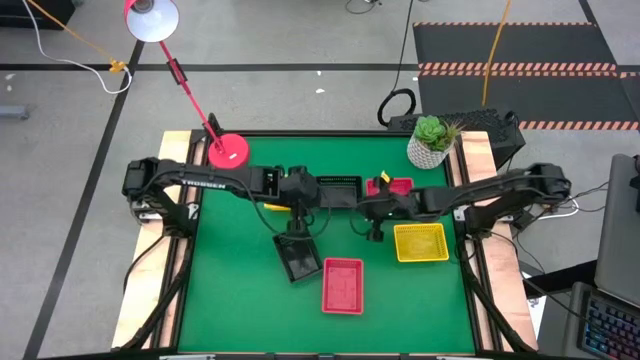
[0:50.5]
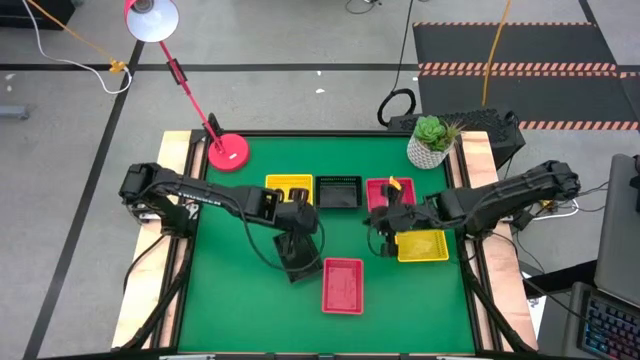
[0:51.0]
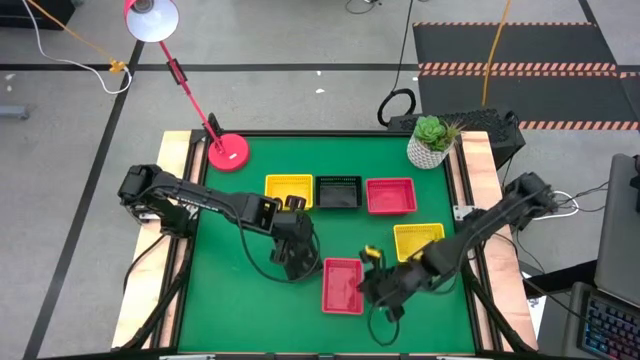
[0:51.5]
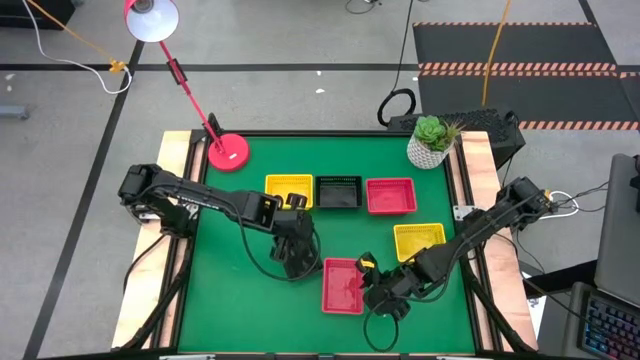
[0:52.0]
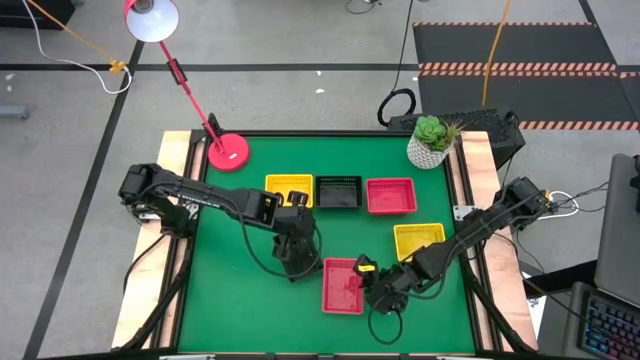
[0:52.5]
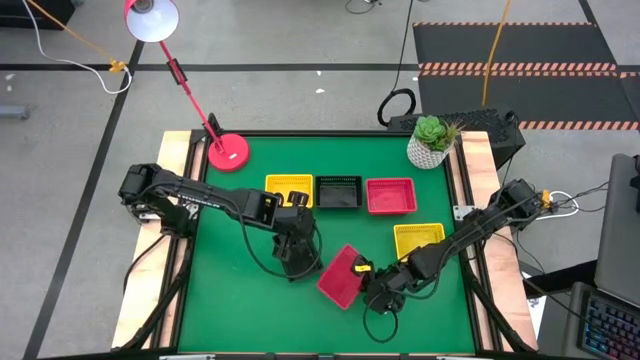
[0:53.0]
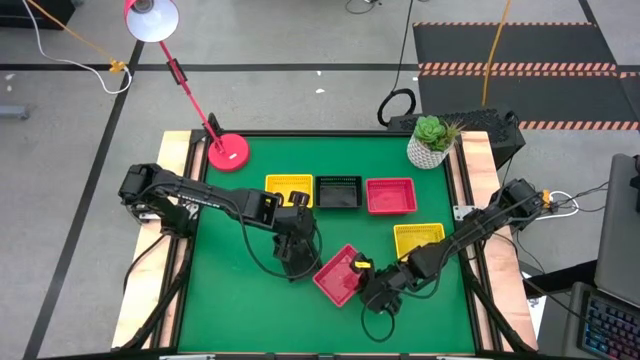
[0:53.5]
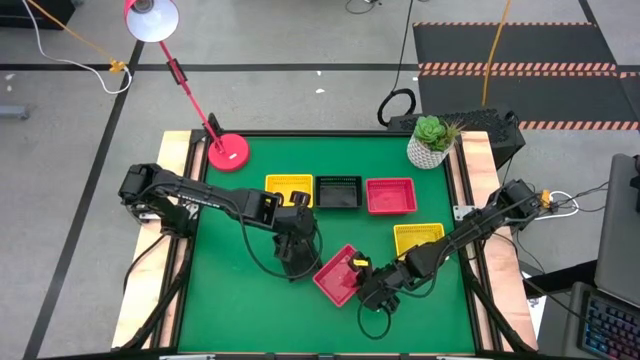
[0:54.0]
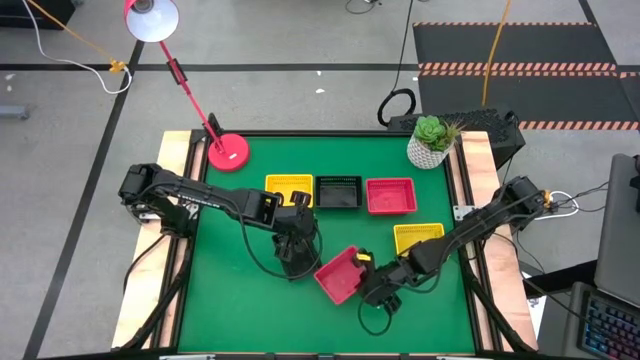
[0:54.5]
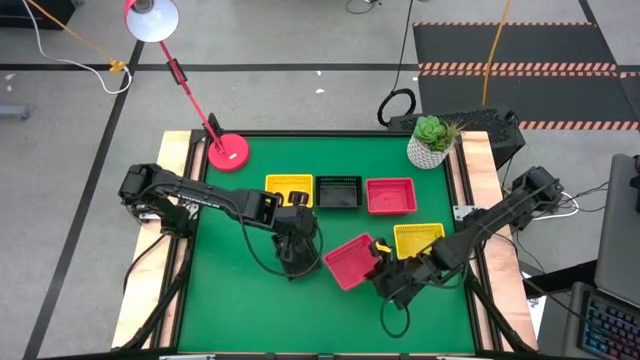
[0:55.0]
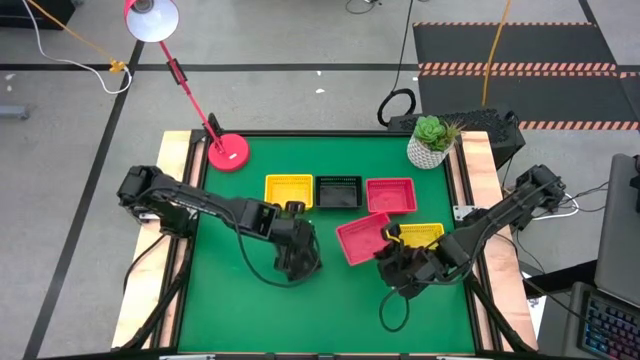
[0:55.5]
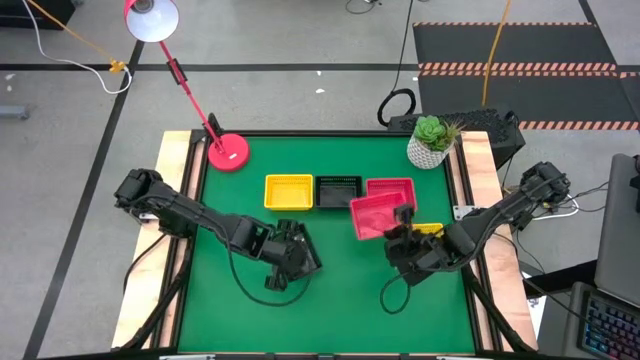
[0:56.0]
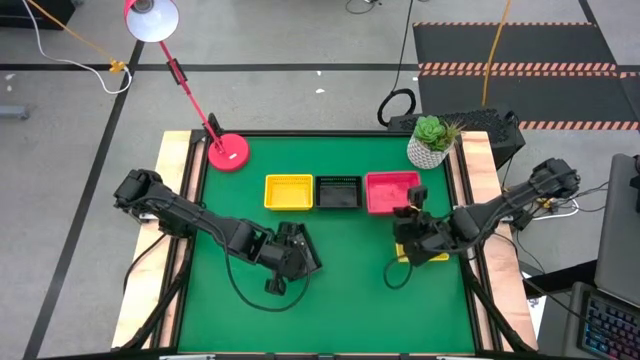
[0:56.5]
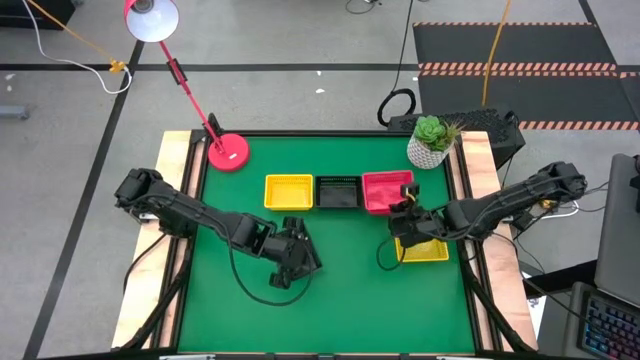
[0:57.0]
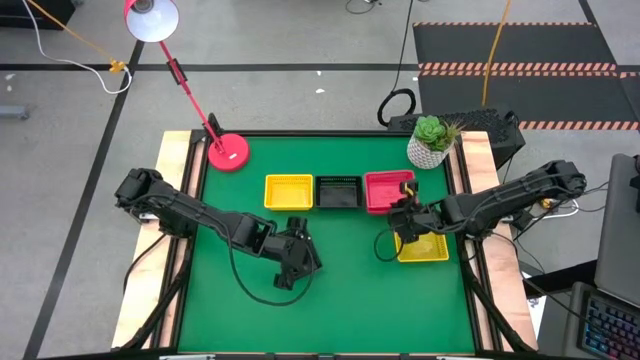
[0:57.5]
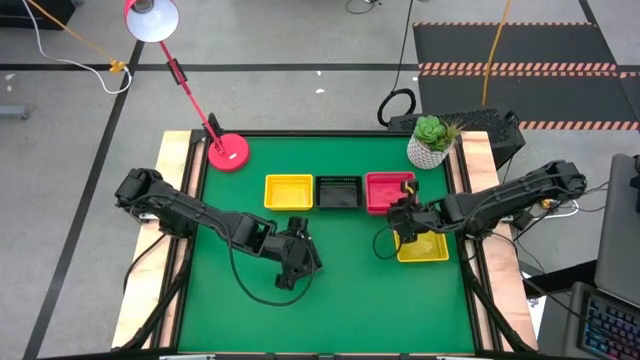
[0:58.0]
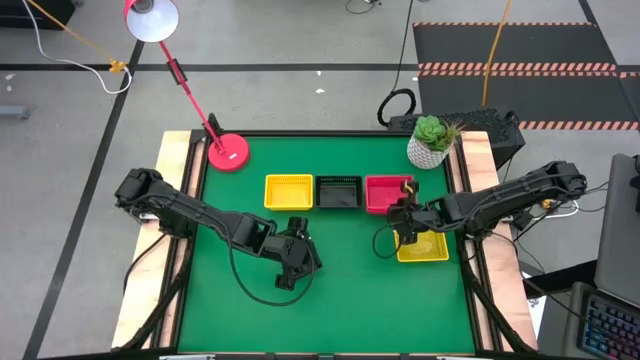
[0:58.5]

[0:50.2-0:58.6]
Stack the bottom red bin on top of the top red bin

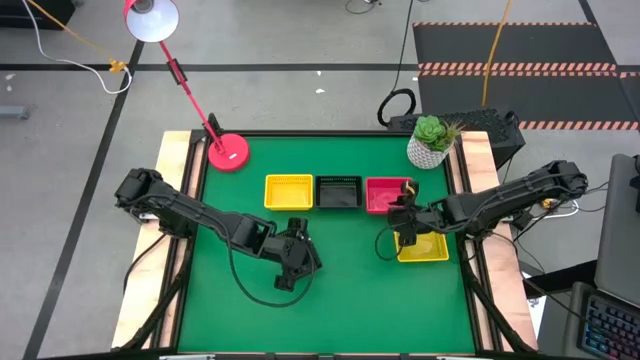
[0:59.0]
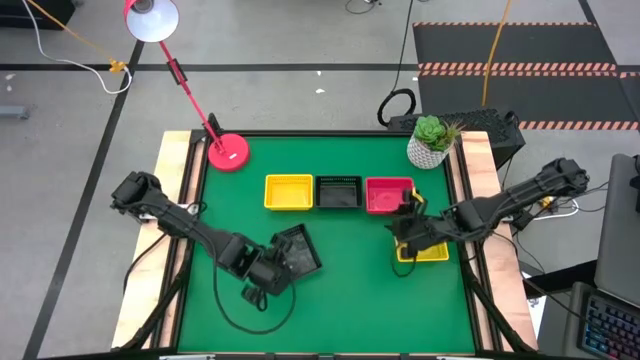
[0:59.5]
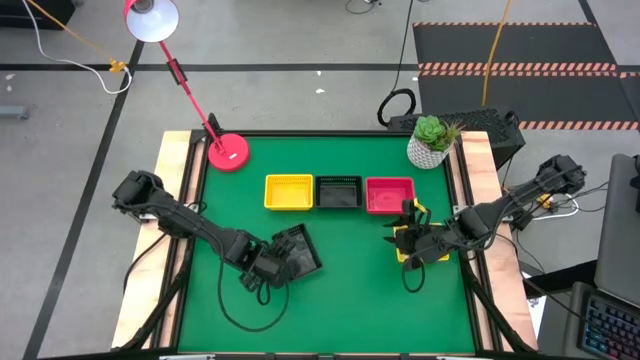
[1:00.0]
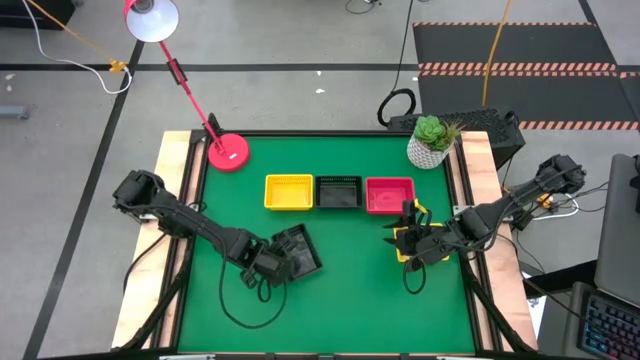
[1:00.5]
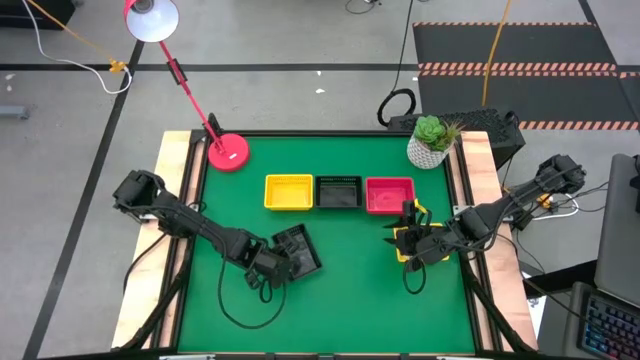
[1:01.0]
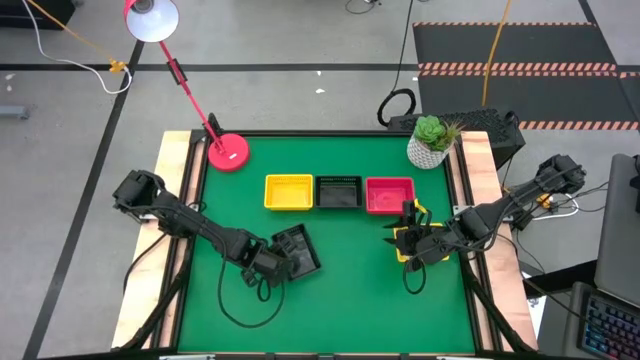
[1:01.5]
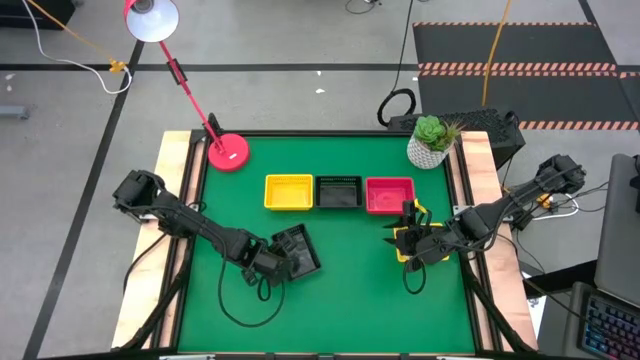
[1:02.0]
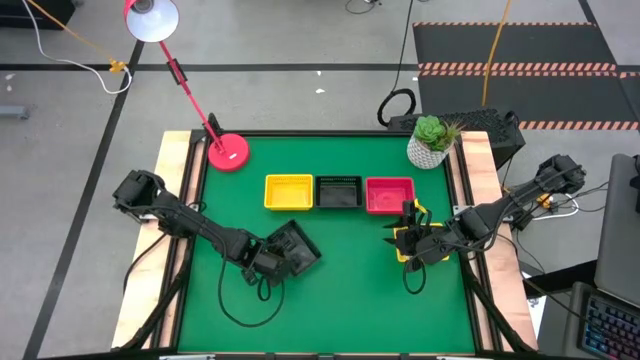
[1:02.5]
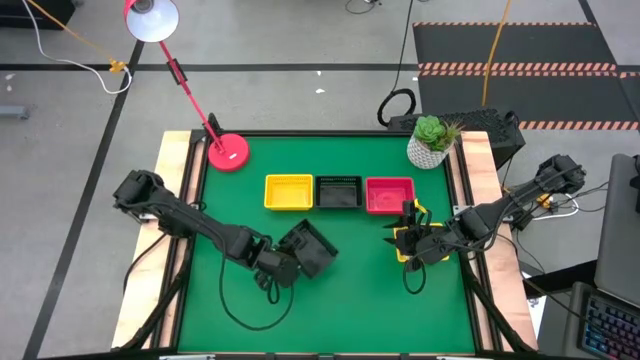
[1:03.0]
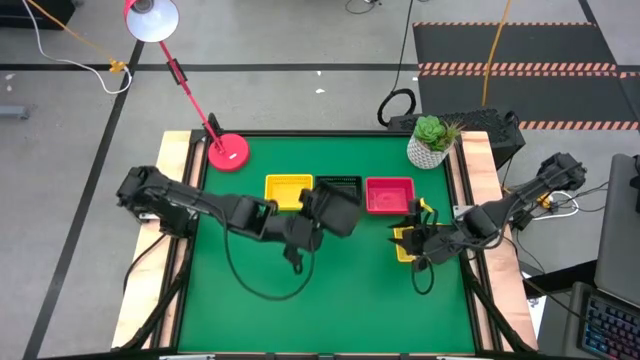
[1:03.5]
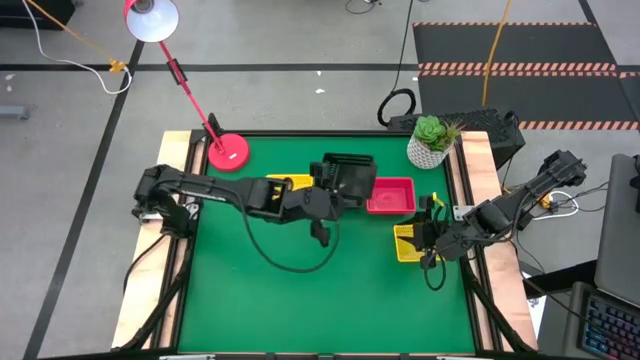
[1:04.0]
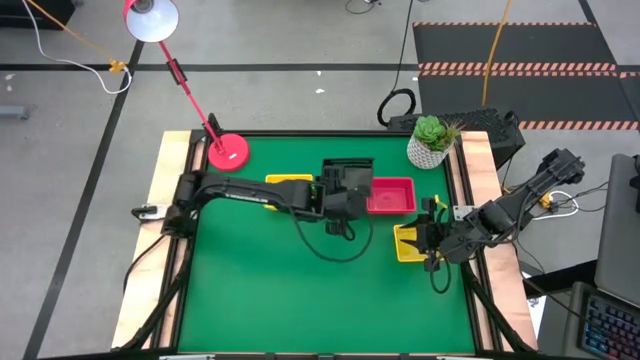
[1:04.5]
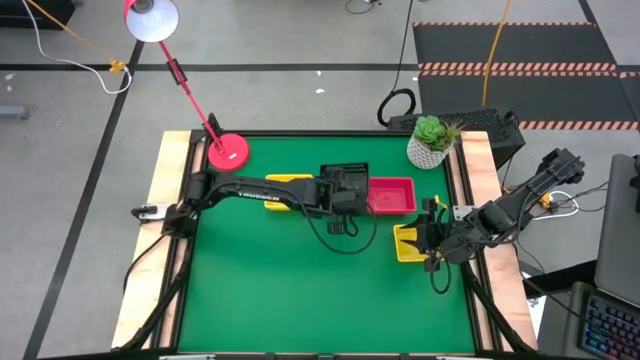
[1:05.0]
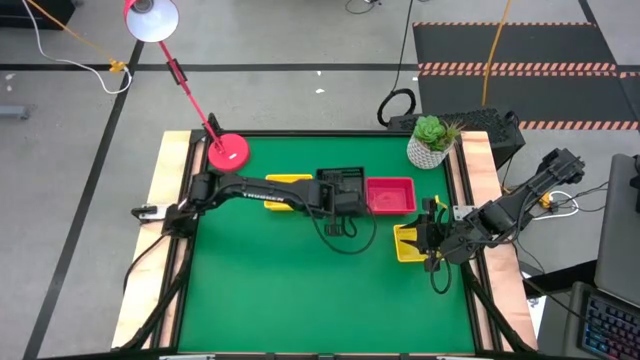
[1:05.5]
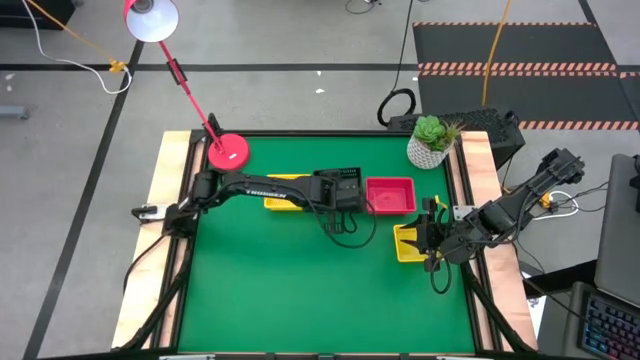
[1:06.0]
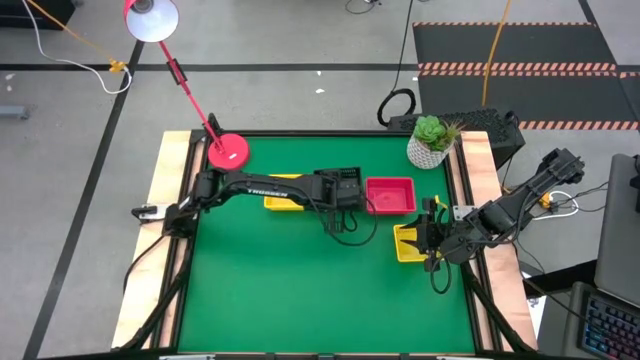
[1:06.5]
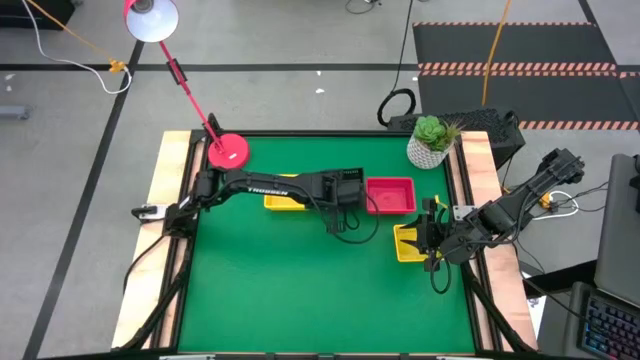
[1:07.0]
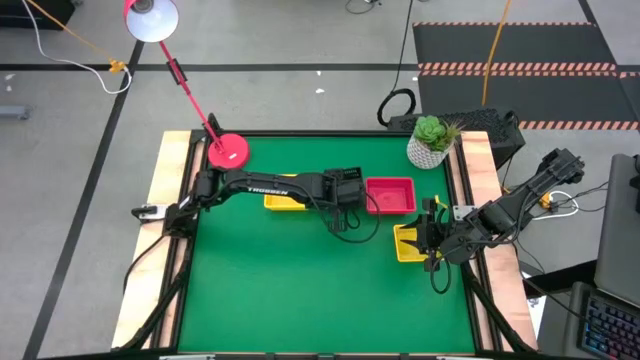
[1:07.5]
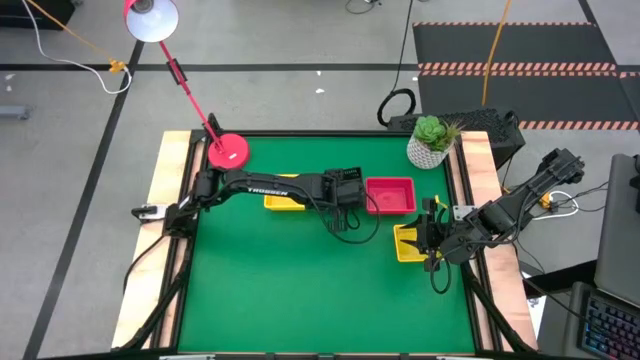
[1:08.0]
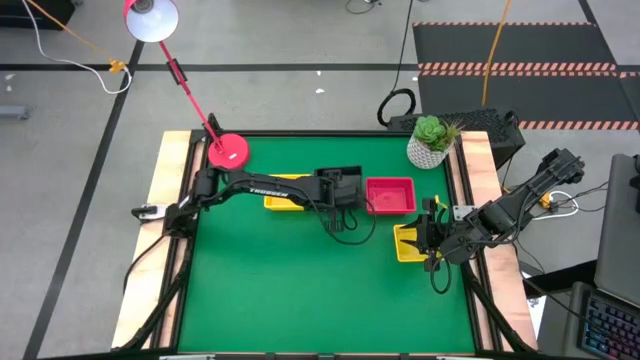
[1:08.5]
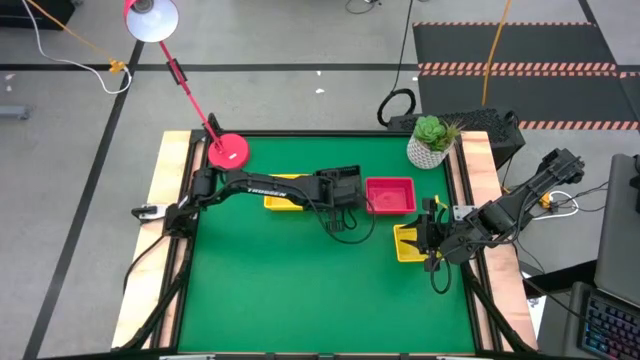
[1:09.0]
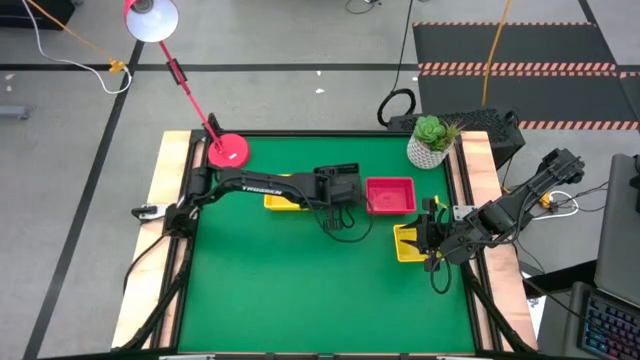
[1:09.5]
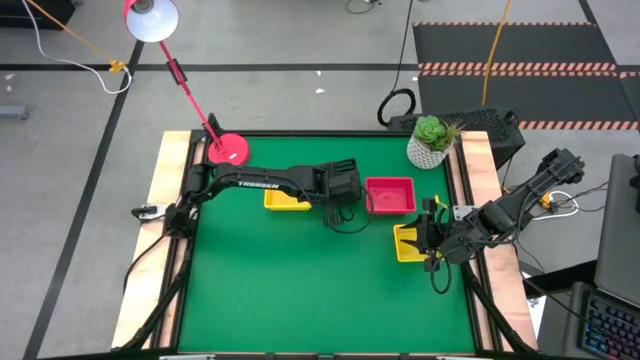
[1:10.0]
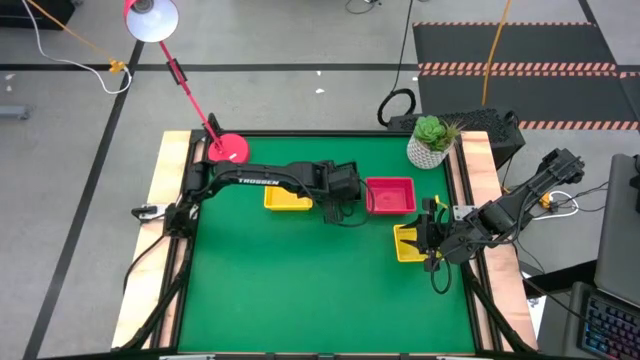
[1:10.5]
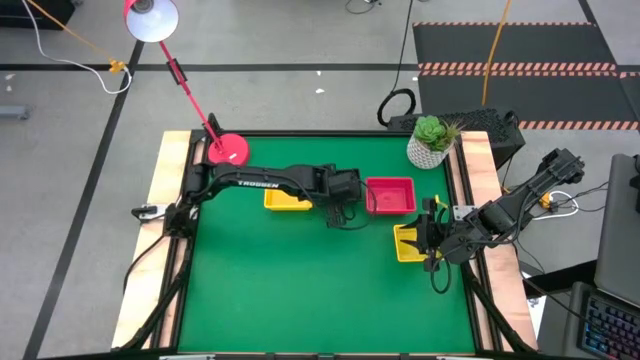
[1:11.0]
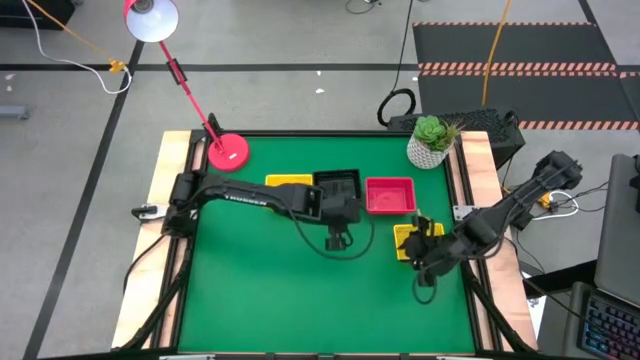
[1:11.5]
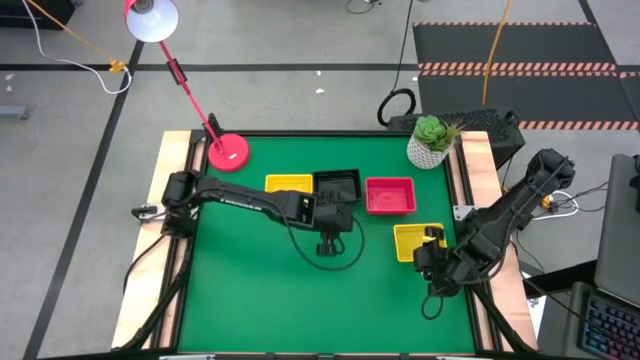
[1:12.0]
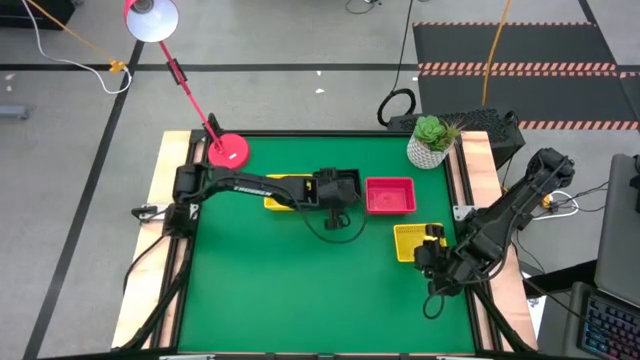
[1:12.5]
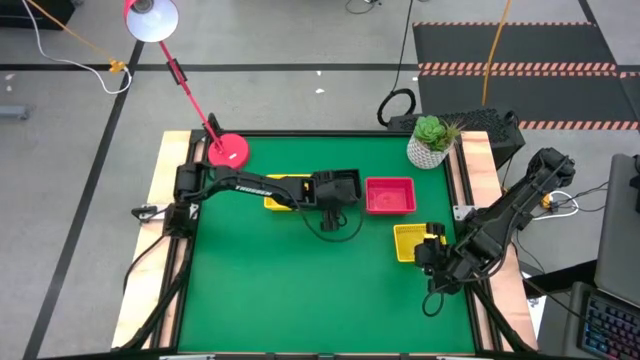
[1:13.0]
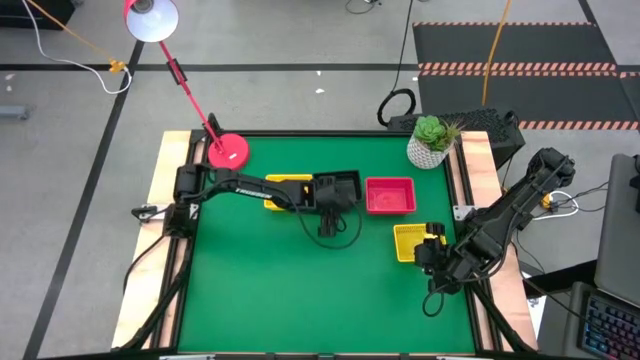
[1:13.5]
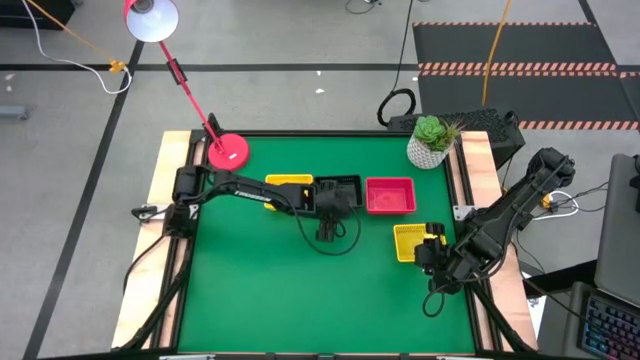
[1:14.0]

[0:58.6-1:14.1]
Stack the bottom black bin on top of the top black bin
